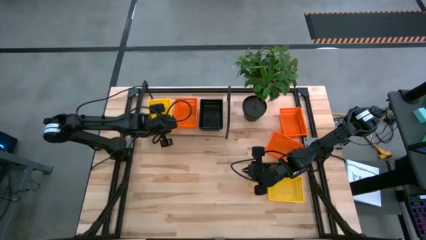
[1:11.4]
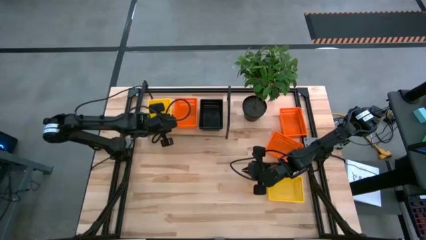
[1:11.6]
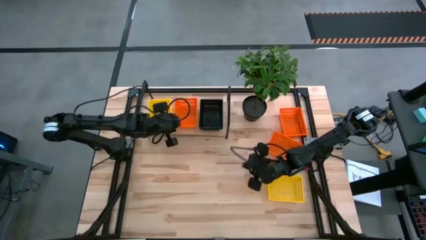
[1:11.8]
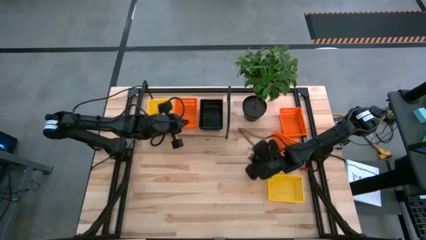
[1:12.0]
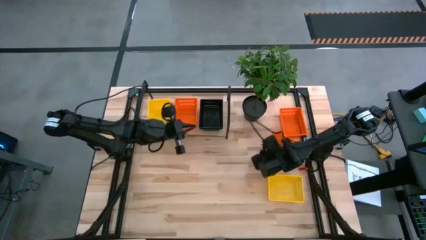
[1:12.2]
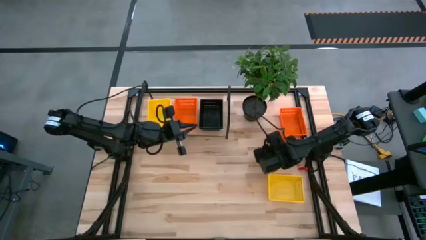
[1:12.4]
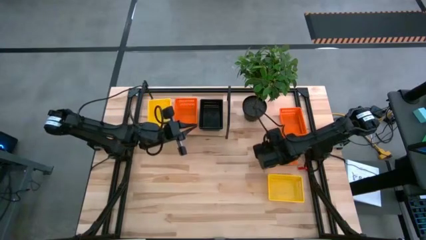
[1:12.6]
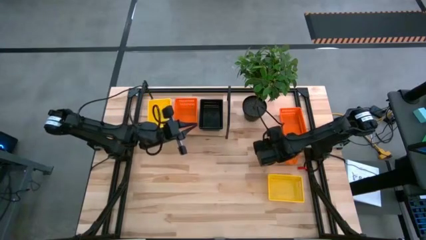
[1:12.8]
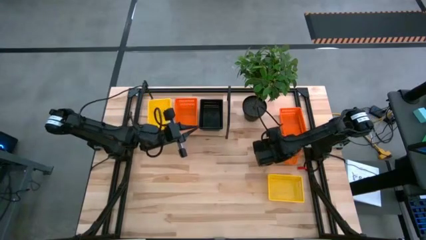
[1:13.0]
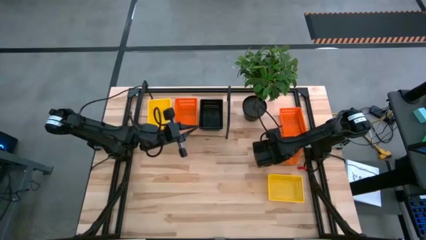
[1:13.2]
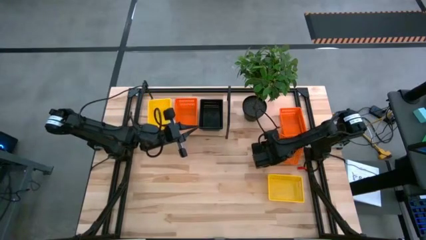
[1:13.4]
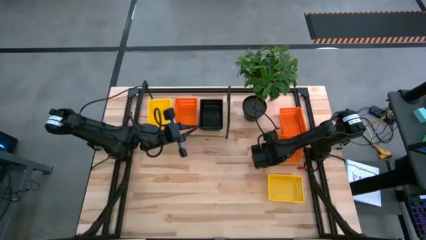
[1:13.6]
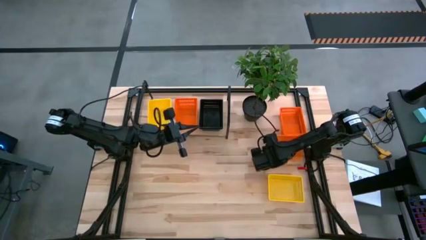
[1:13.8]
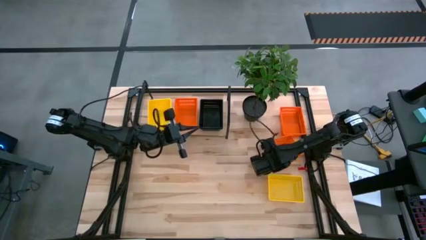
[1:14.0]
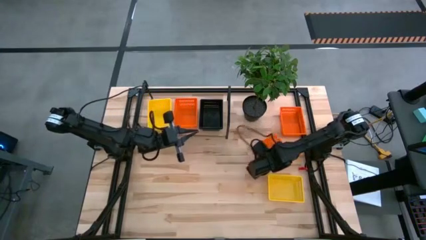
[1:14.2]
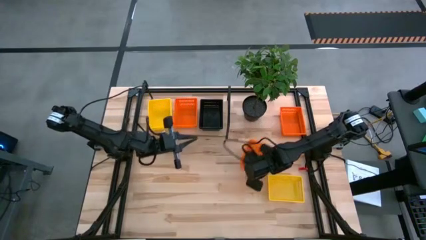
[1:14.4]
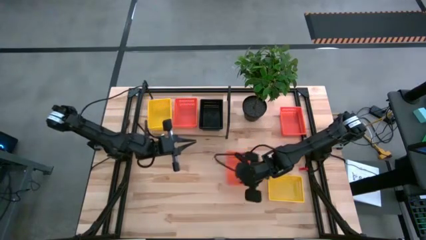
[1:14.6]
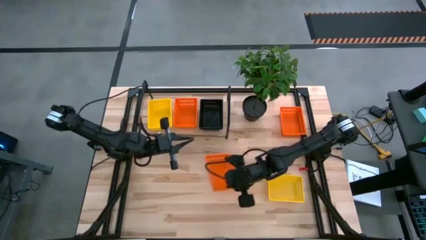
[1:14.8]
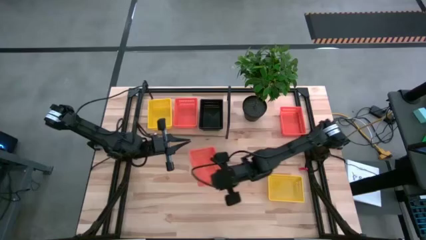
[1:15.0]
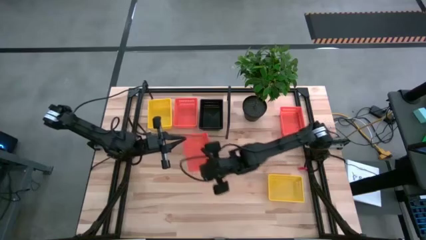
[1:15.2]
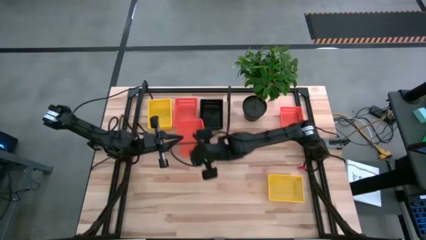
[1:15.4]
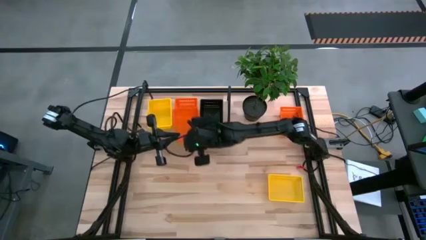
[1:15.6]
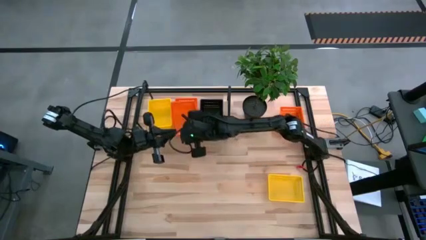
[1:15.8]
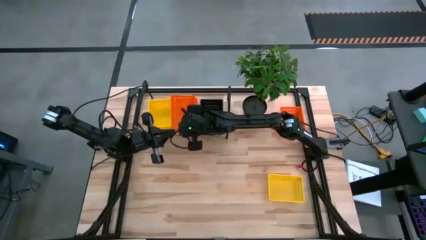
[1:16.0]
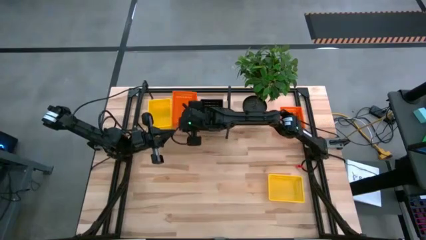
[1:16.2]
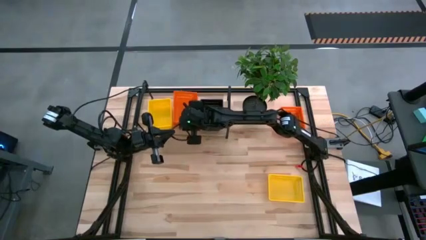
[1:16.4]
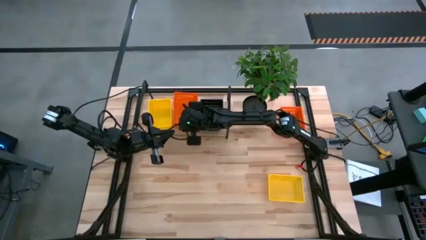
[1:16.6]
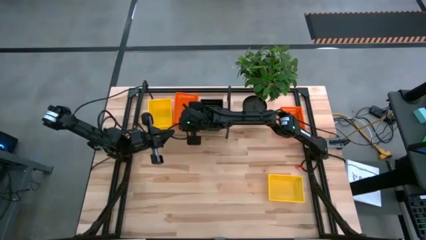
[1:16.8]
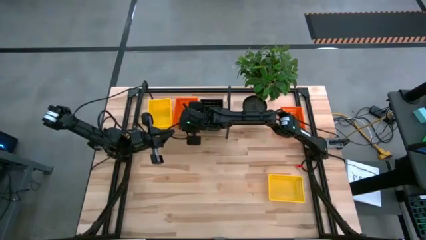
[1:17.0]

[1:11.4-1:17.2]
Task: Stack baskets on shelf by color
Stack the bottom orange basket on the orange basket on the shelf

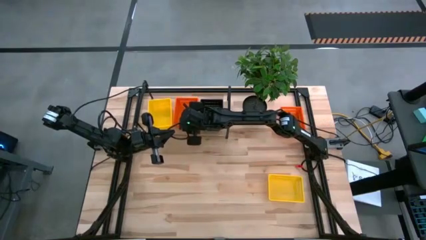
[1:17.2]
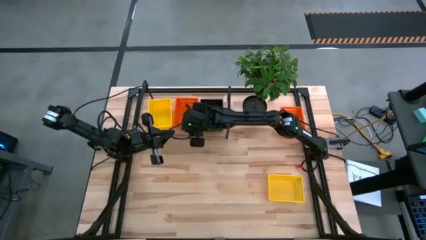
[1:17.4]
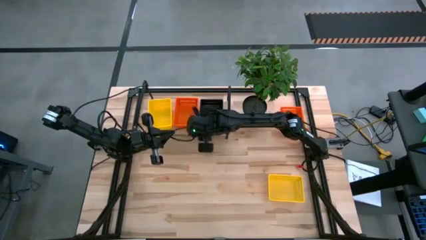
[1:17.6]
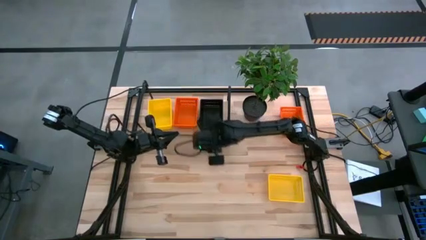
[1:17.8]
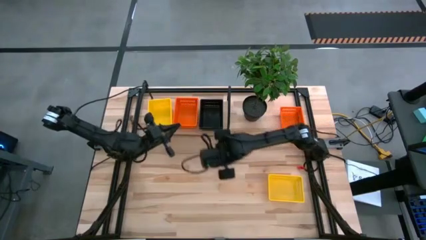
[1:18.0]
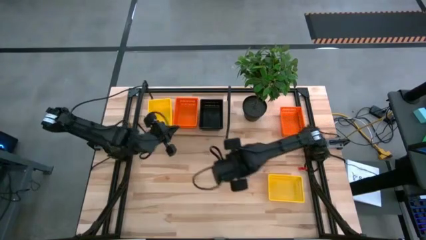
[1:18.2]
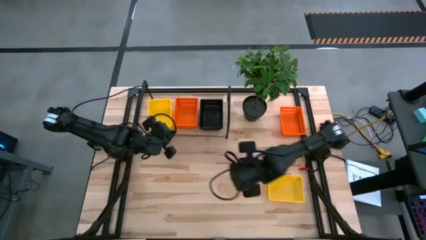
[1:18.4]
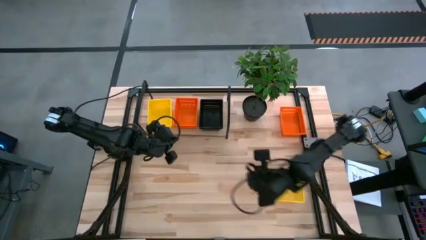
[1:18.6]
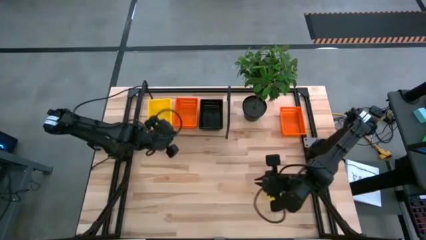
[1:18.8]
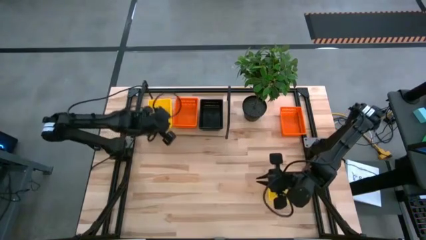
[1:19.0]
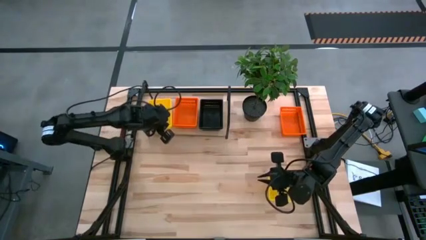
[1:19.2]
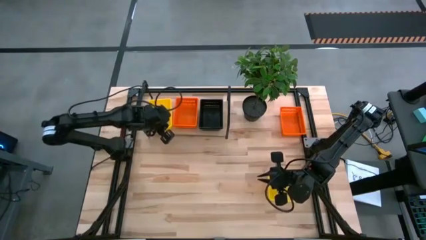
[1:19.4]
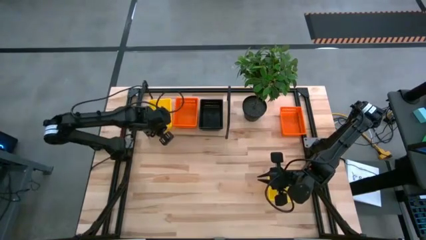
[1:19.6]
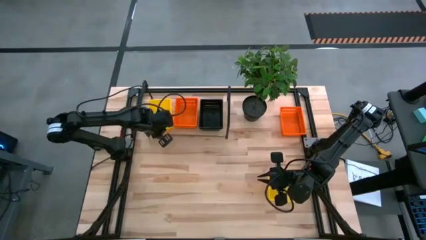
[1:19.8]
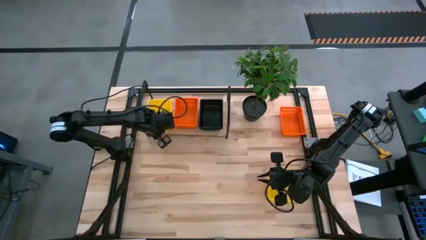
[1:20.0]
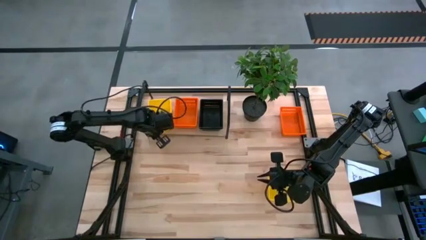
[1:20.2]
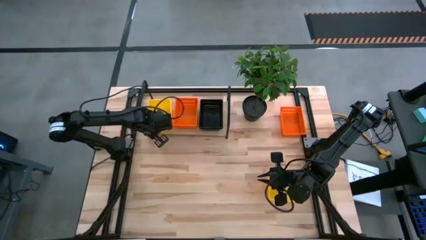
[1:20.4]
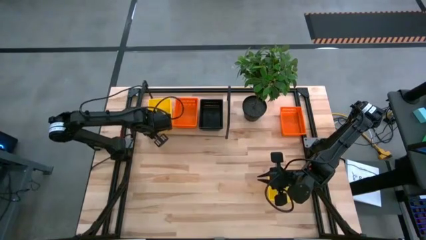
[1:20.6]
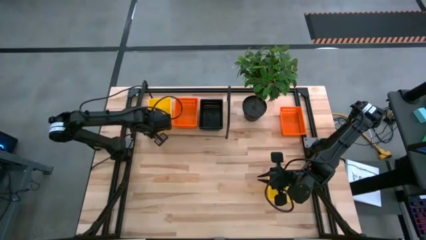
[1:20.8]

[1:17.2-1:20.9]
Adjust the stacked yellow baskets on the shelf

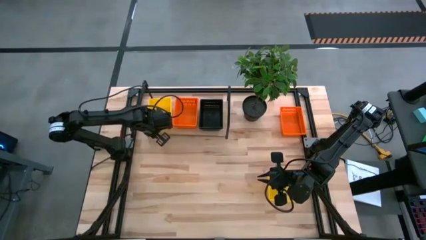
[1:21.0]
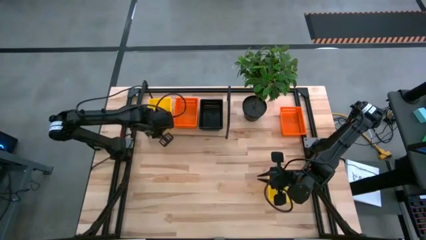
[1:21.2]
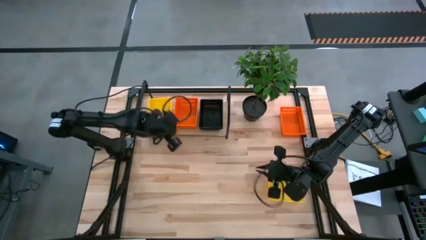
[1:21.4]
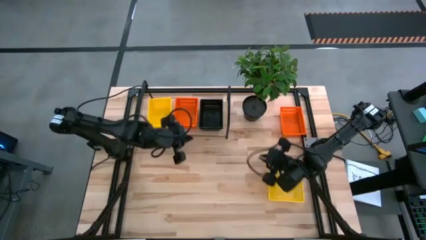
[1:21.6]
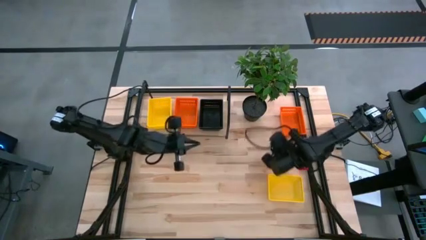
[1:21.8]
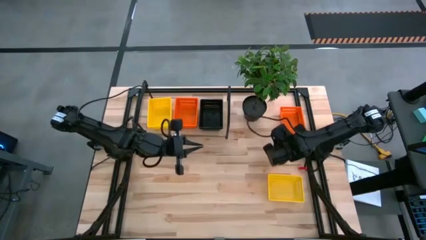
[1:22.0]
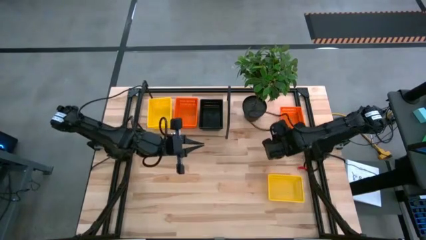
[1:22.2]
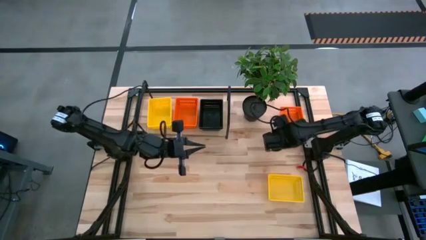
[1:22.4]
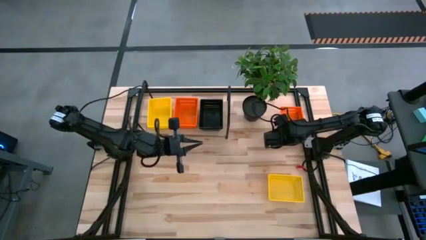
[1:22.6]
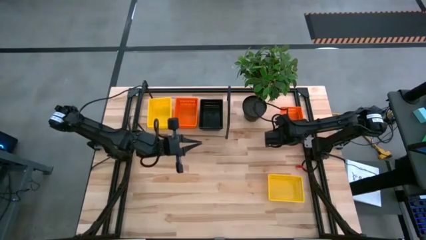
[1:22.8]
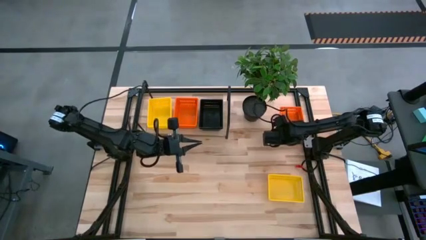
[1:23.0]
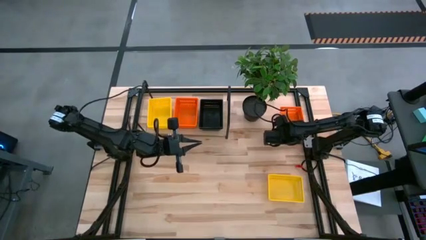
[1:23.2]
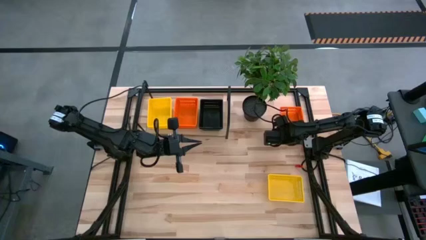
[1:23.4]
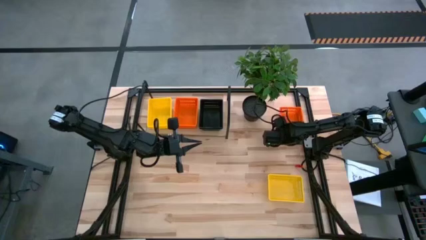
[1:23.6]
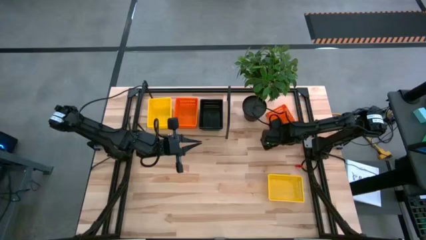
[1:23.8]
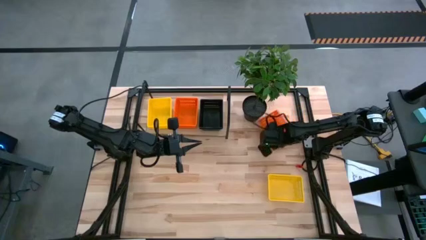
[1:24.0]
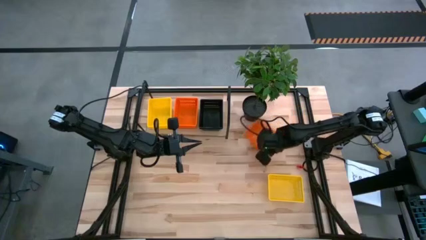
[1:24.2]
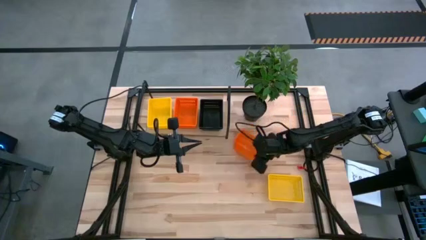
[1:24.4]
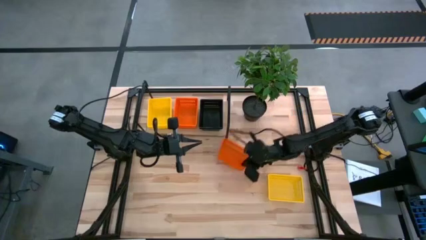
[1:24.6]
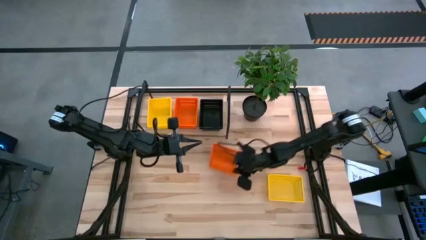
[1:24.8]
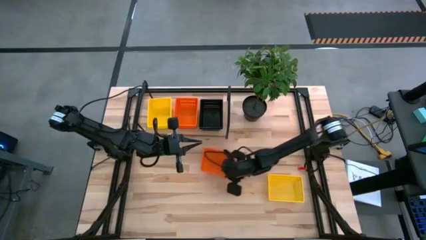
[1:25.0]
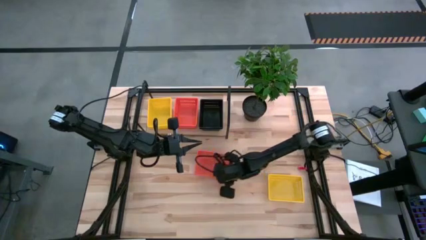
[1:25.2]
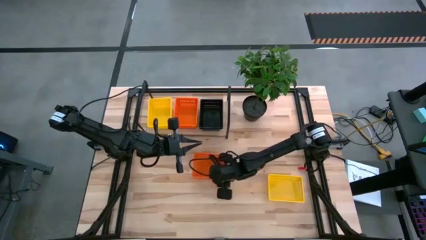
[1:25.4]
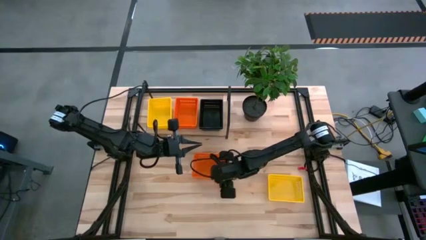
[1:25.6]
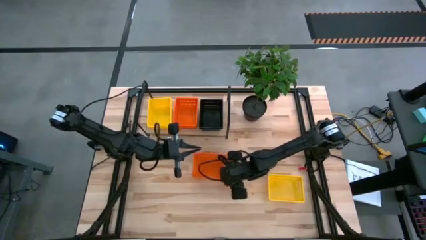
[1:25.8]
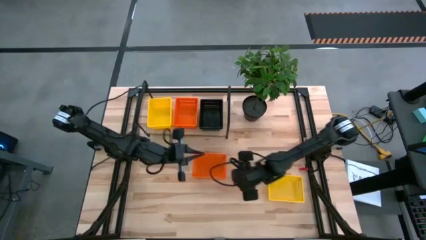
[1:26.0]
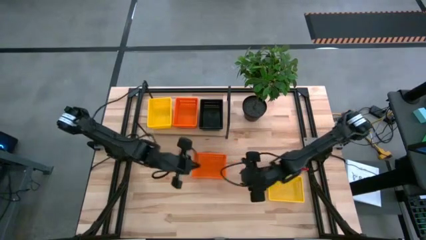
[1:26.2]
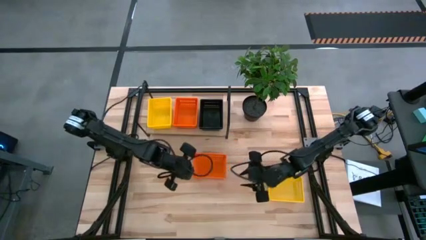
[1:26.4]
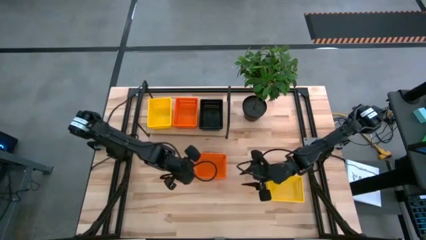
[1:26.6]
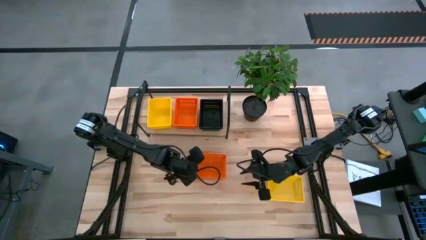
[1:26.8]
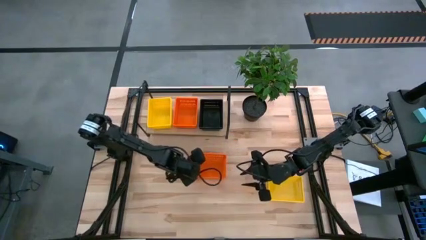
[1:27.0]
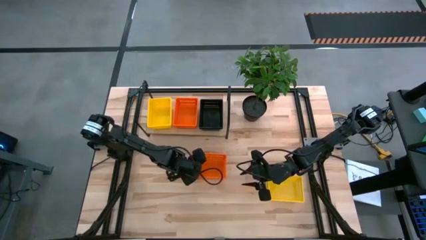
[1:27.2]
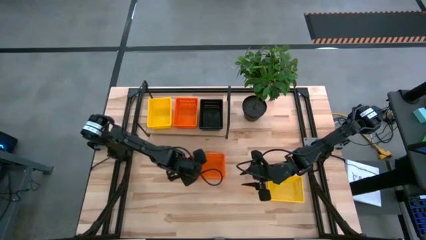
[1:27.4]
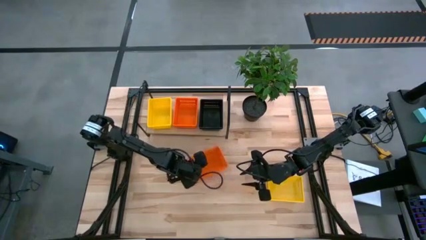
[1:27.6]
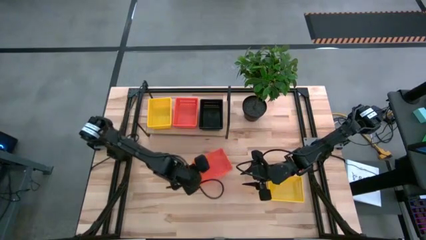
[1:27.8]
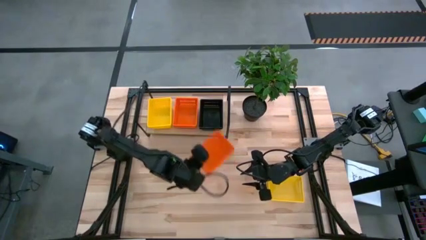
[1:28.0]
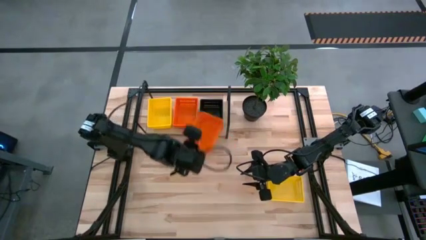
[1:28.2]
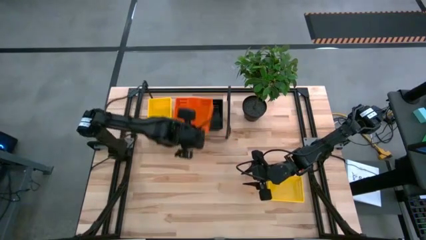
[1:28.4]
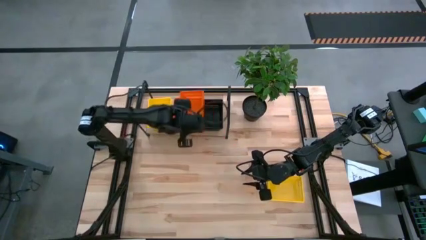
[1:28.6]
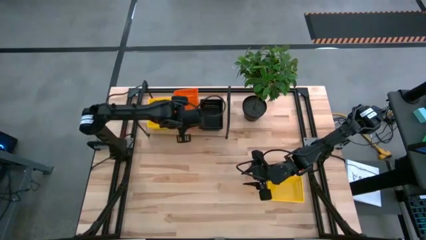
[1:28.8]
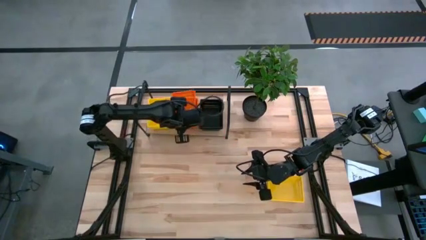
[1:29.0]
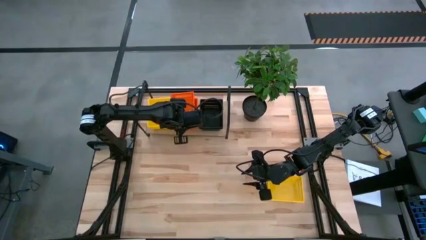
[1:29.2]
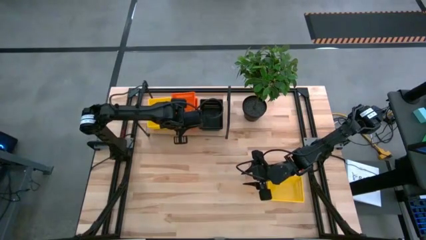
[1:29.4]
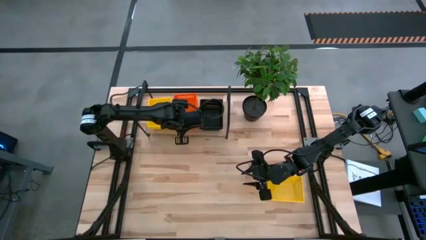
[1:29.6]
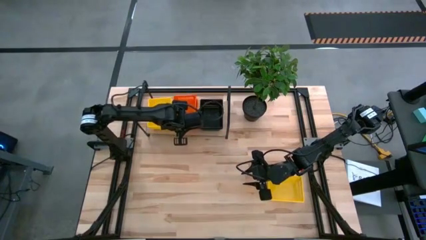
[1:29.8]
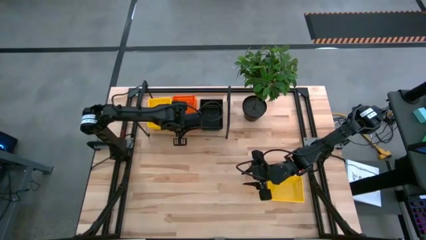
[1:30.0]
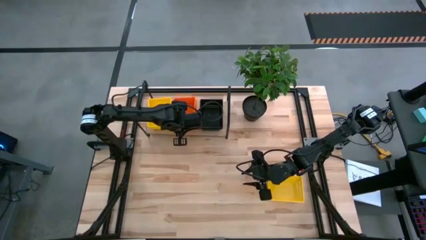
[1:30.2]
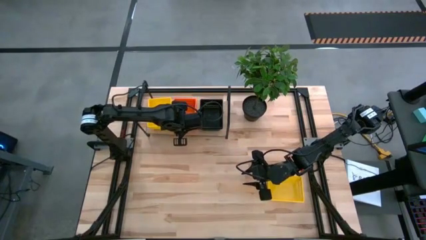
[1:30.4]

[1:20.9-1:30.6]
Stack the orange basket on the orange basket on the shelf
